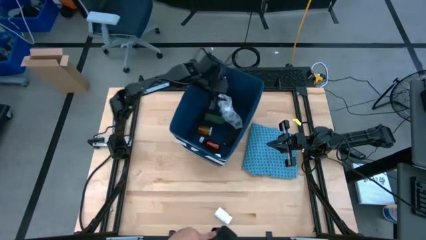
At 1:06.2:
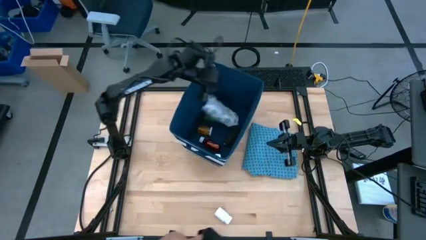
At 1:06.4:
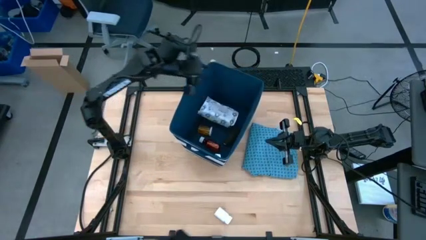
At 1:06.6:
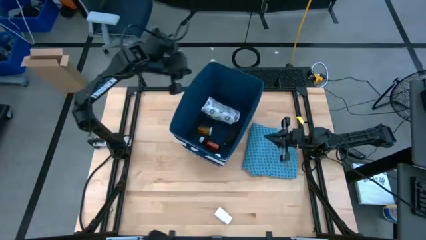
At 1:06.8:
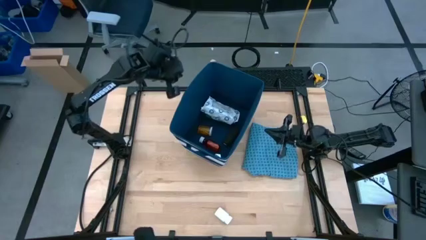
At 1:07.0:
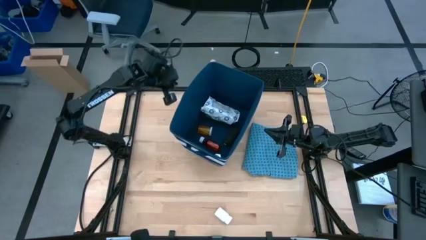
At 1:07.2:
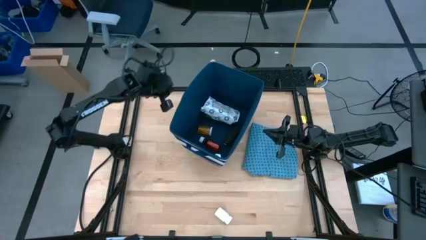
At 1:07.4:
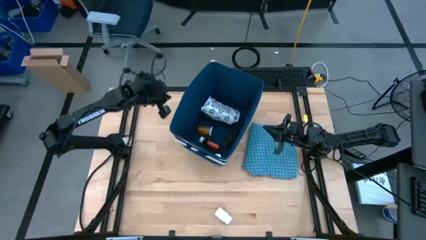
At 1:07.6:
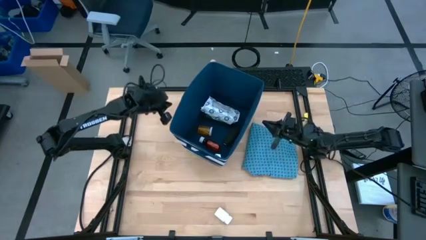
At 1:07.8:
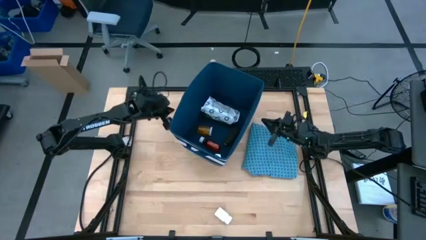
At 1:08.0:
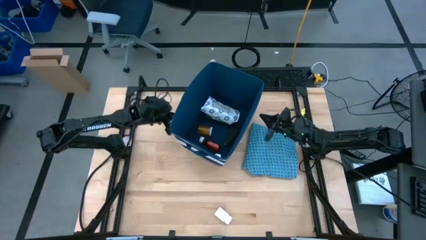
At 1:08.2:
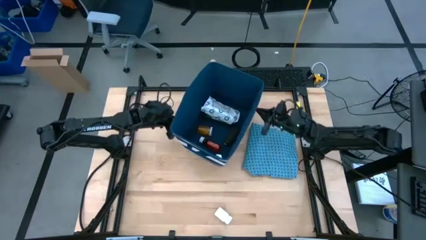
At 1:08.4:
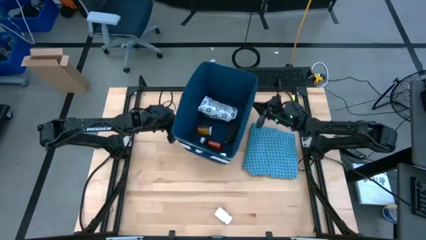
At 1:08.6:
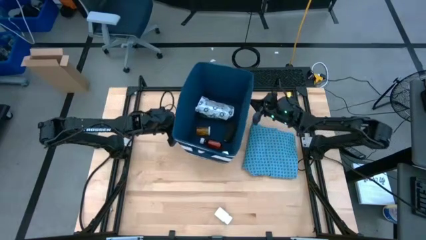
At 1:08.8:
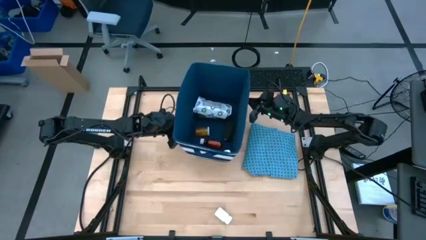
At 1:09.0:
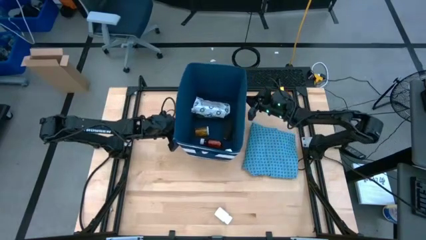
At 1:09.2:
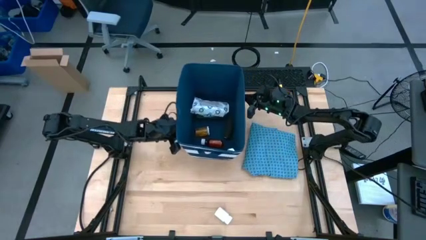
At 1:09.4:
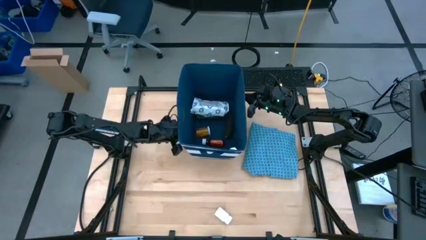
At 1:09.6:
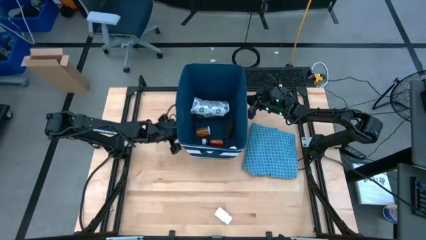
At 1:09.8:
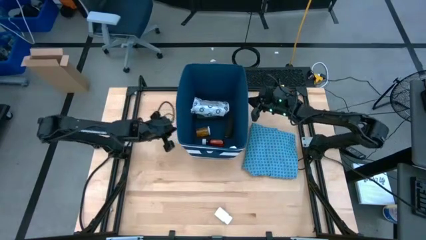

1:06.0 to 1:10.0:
Task: Pick & place medical supplies in basket/bin
Adjust the blue bin

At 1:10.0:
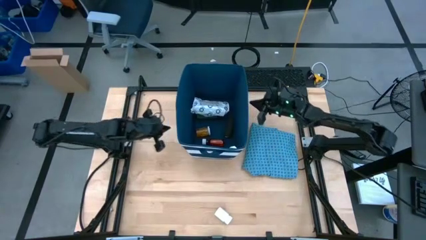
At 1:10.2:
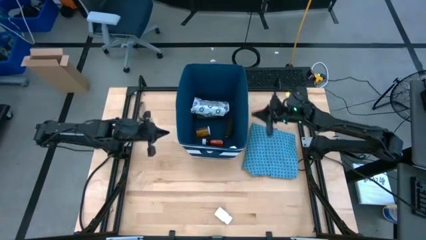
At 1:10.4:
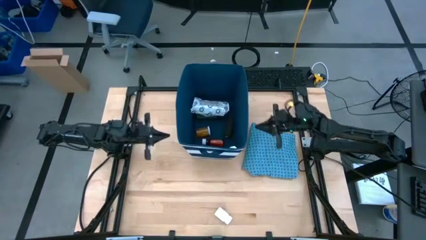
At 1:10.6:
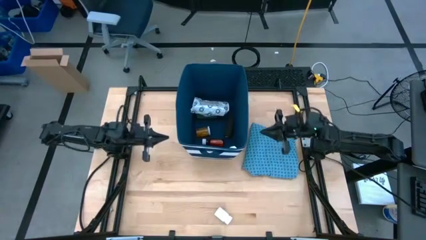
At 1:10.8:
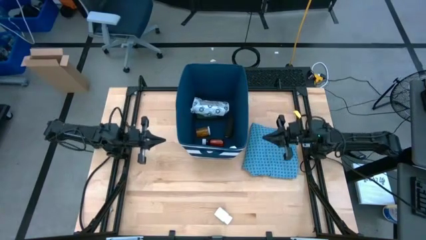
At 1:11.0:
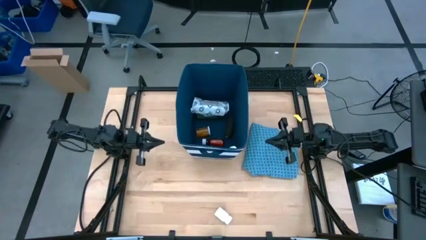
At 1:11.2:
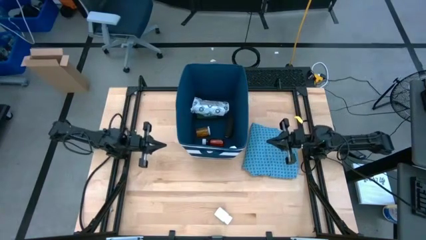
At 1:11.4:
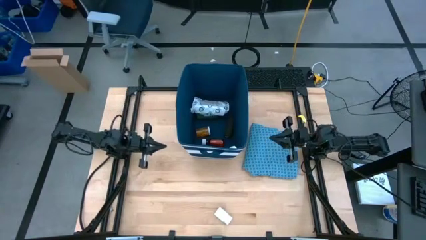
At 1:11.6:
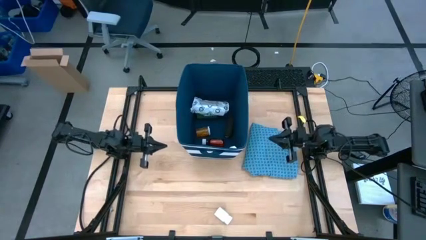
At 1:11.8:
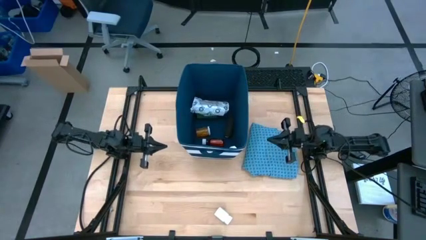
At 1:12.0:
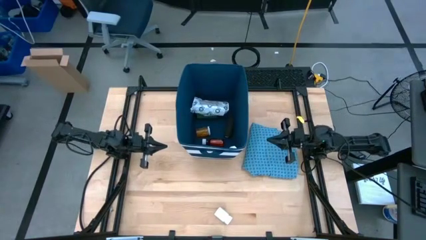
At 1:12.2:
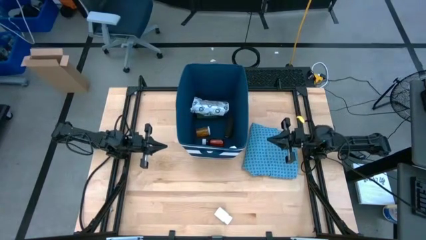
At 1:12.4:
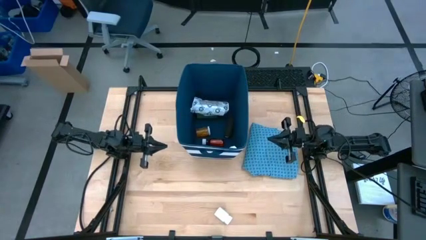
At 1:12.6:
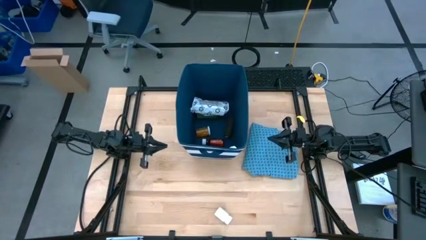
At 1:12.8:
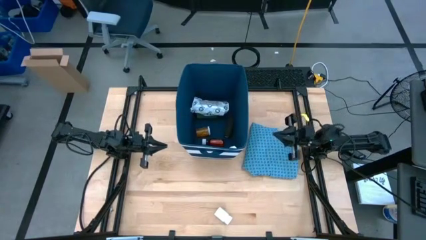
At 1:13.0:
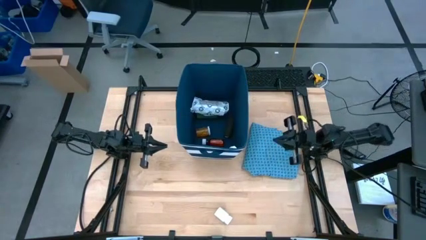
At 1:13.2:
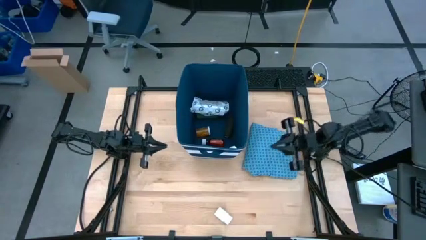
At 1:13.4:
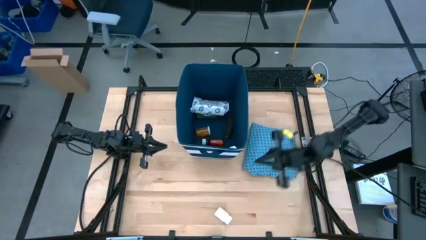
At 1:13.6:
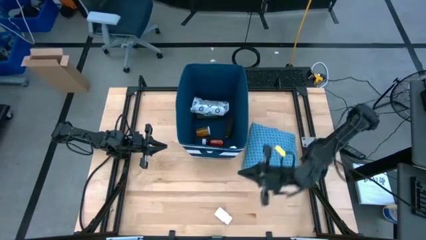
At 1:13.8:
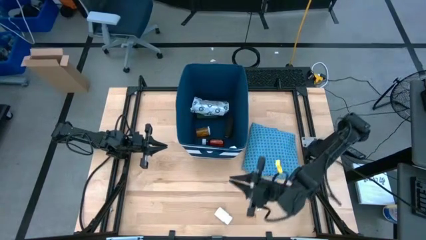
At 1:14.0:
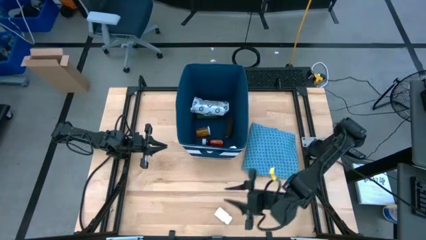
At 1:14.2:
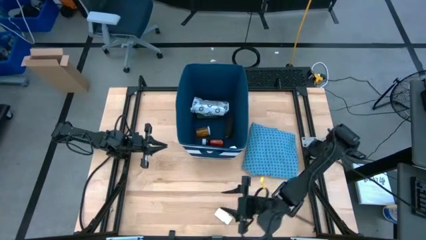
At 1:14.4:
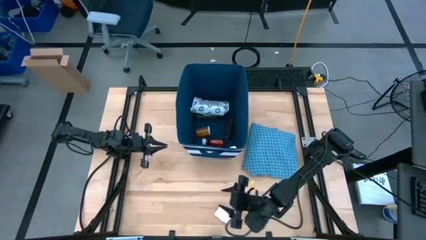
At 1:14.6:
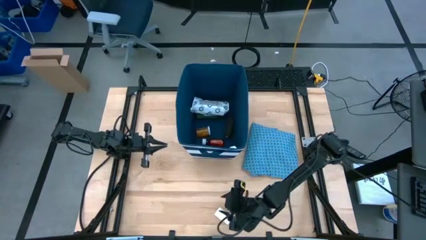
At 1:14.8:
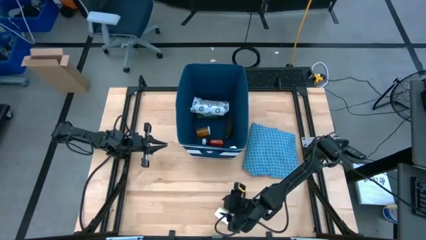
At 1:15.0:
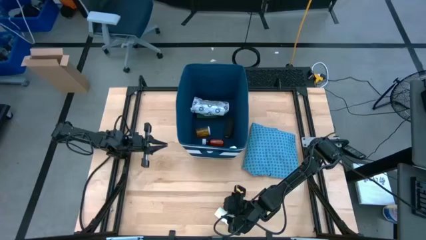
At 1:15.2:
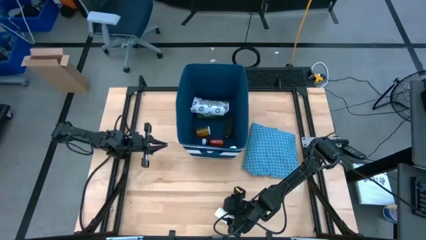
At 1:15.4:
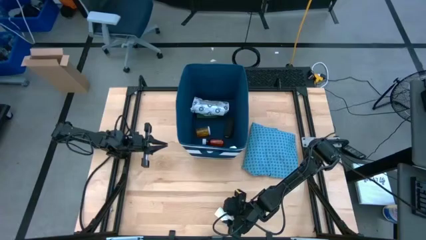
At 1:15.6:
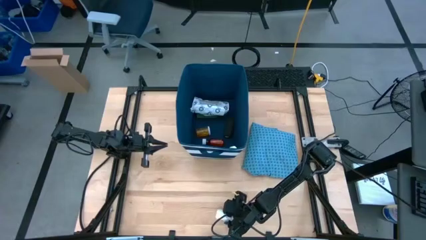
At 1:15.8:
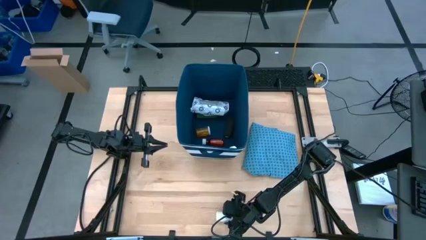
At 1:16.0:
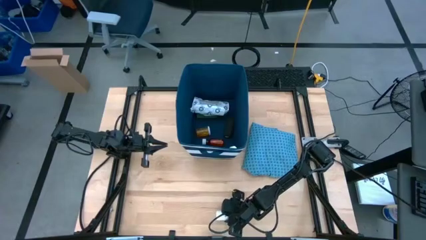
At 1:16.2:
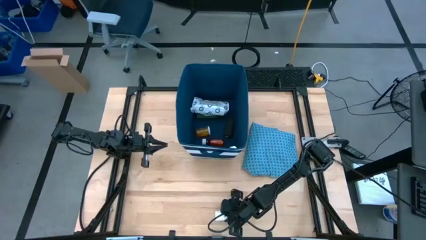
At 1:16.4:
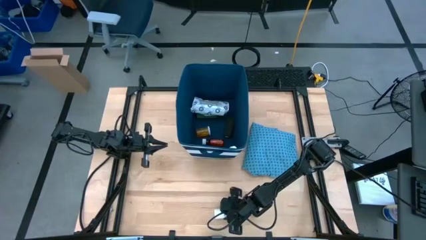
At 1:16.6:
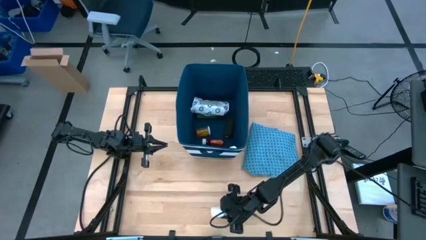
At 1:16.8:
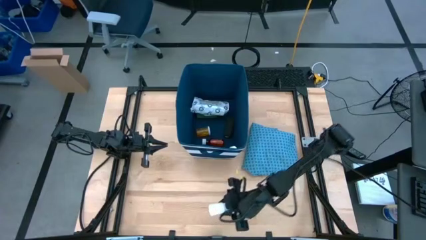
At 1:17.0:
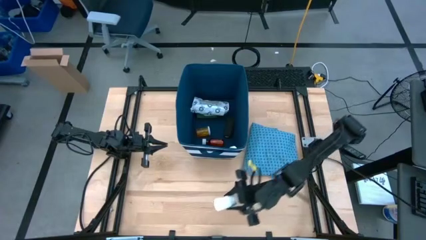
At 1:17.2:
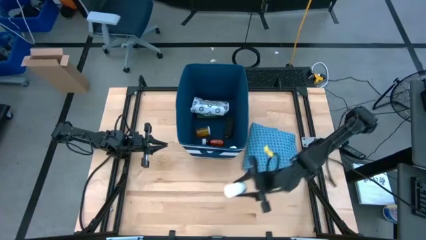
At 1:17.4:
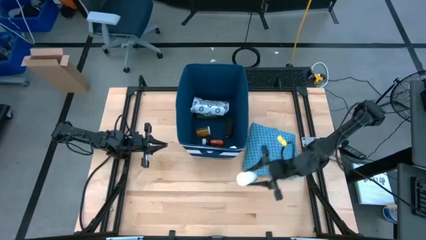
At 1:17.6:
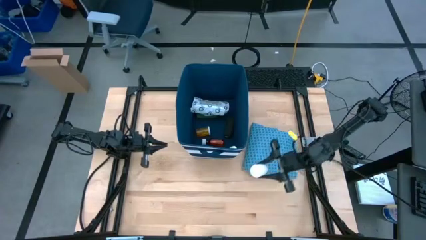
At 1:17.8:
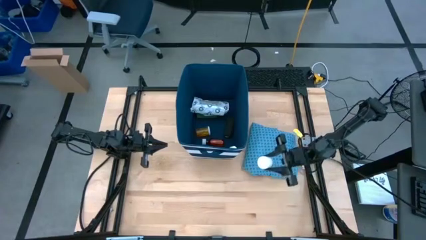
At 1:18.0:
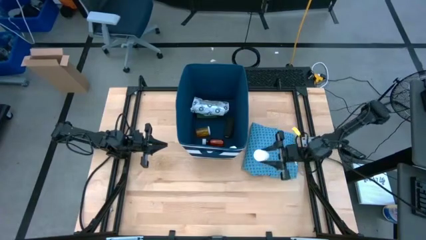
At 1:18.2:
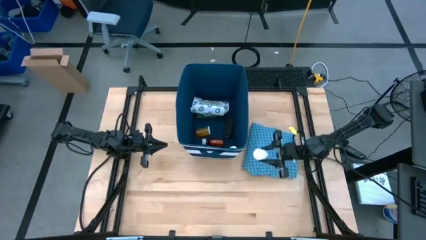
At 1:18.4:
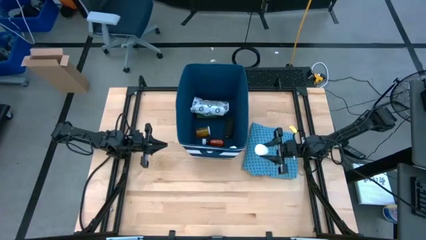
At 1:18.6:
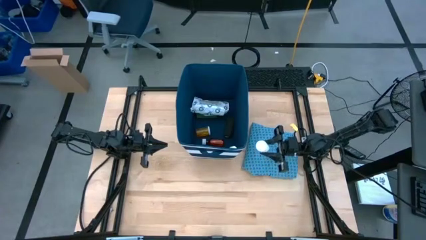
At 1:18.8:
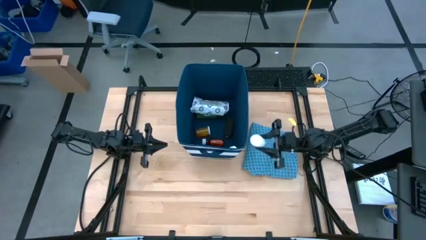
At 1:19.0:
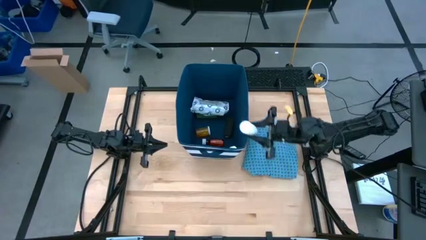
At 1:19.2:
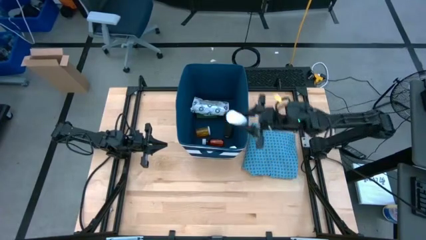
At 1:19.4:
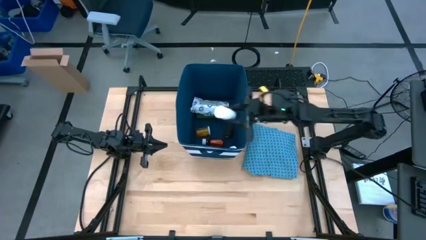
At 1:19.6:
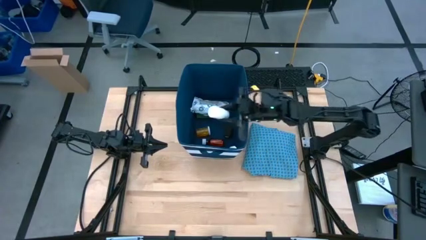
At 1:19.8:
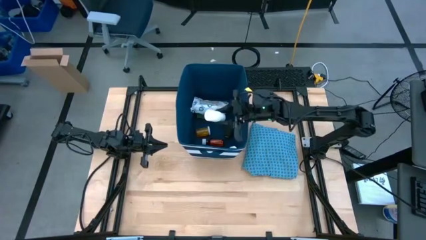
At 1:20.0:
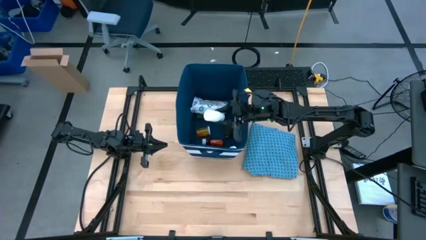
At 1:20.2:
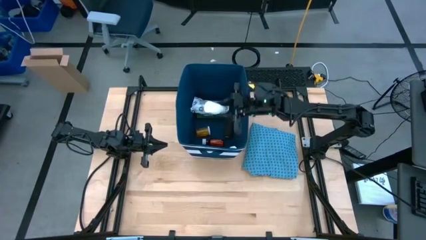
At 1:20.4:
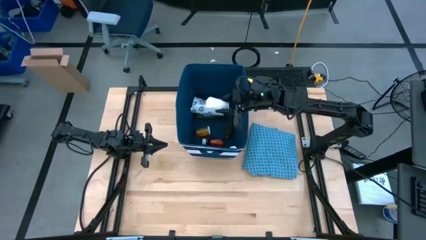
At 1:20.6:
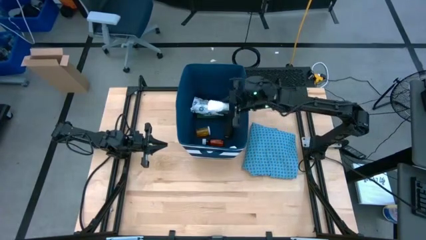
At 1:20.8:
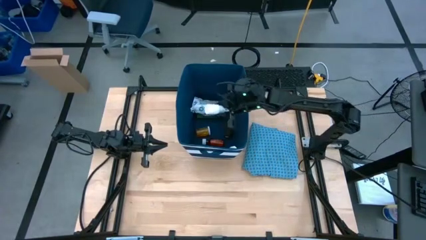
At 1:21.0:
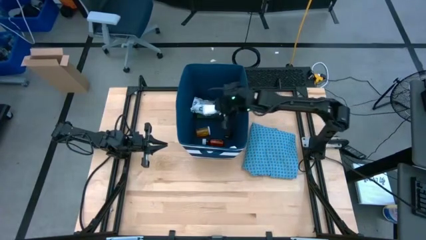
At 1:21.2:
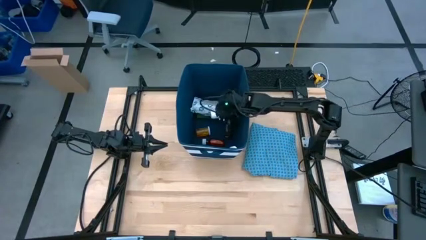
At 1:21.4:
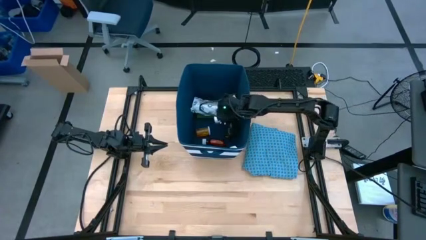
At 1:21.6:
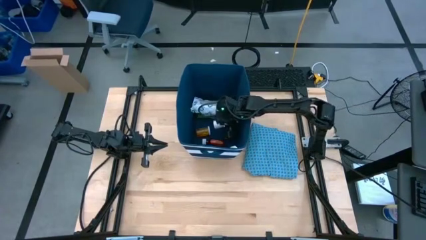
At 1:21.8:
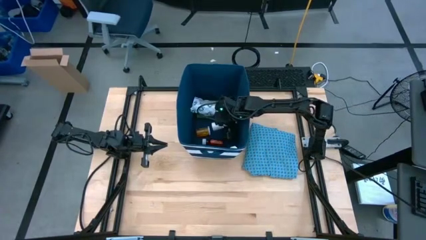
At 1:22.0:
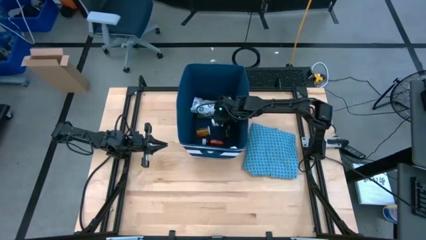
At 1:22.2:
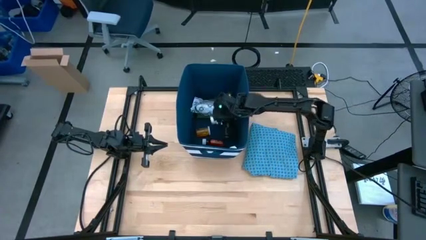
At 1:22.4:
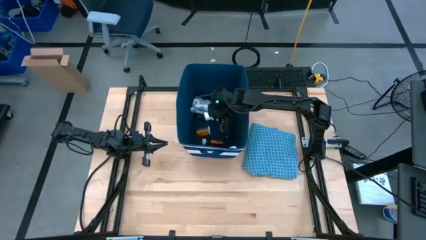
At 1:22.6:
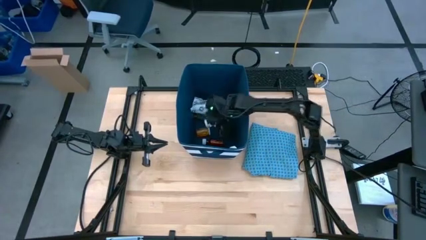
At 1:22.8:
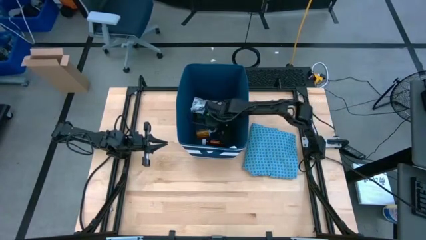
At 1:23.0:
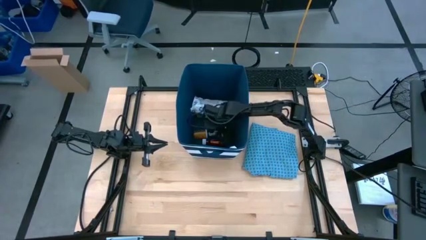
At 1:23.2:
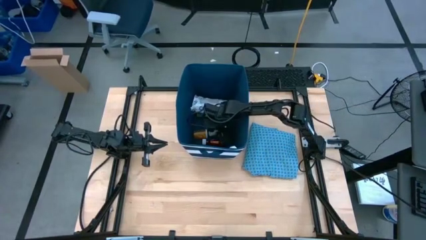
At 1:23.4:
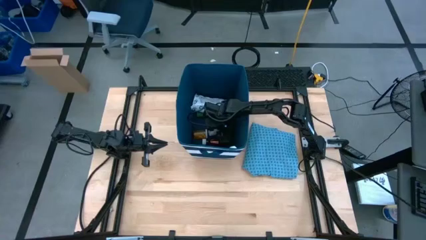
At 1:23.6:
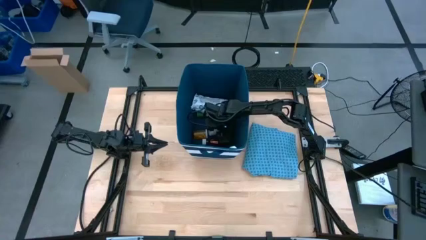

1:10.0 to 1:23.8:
Put the white medicine bottle into the blue bin
